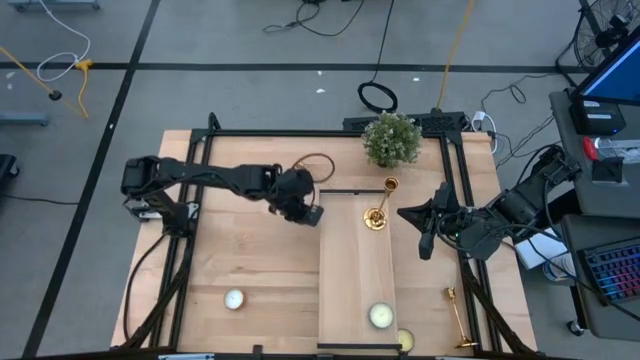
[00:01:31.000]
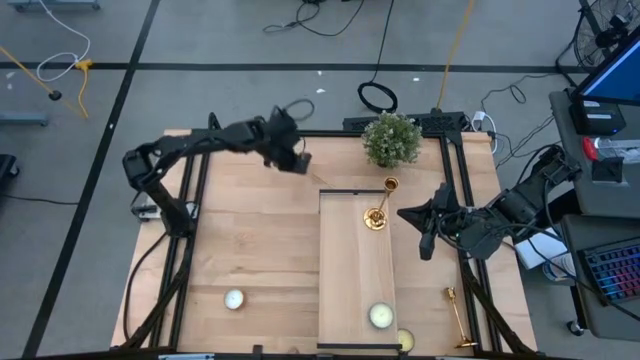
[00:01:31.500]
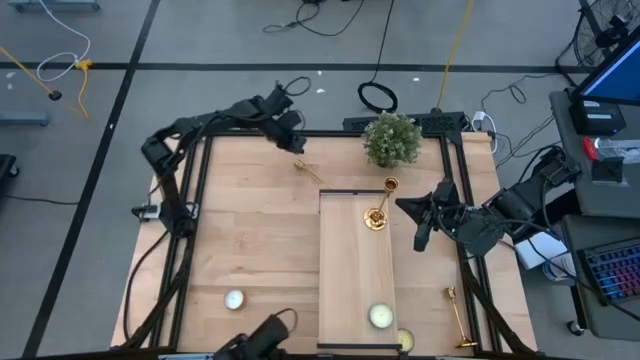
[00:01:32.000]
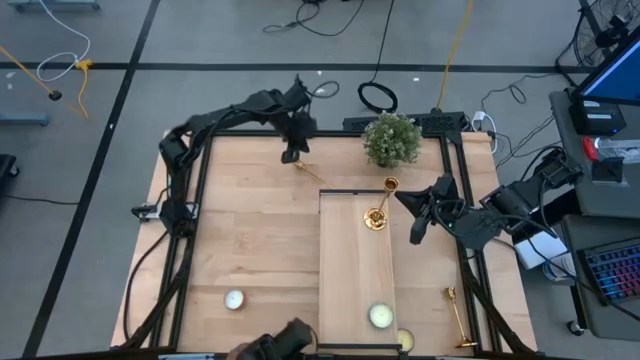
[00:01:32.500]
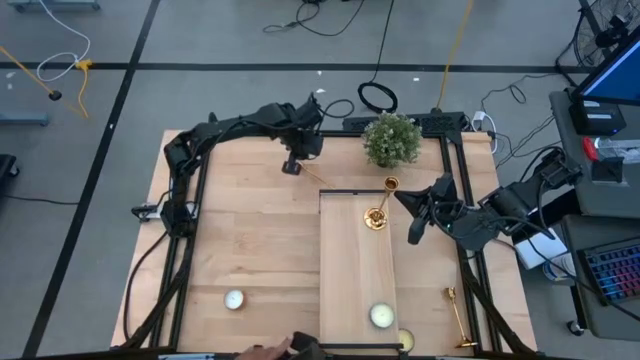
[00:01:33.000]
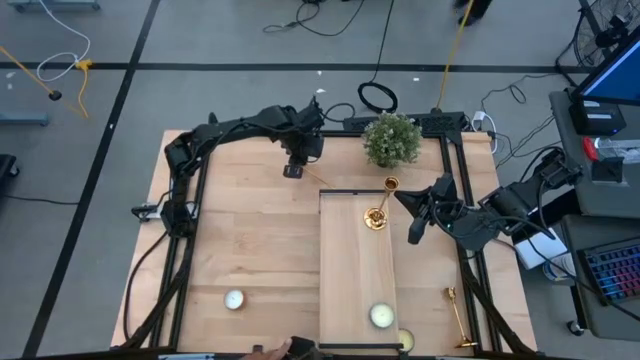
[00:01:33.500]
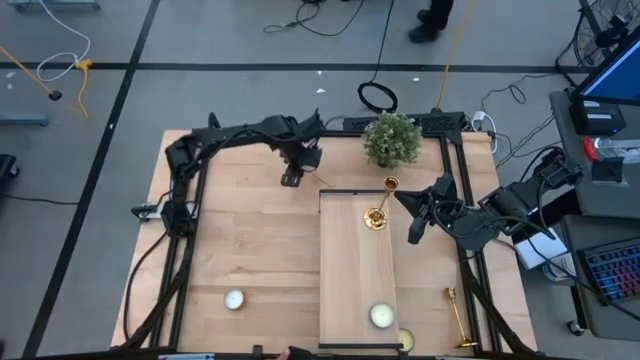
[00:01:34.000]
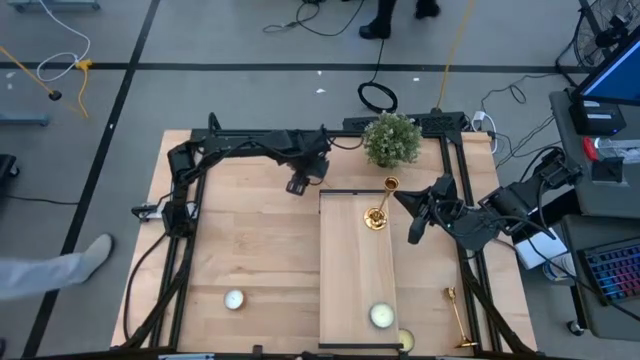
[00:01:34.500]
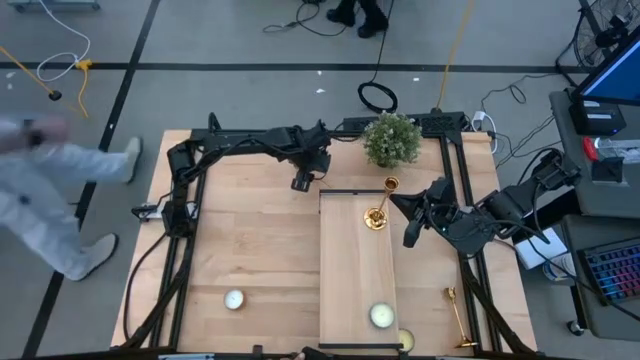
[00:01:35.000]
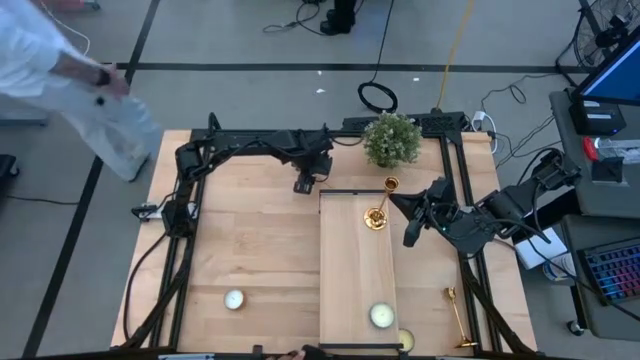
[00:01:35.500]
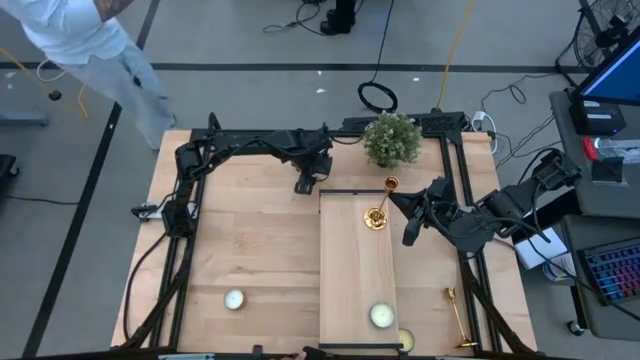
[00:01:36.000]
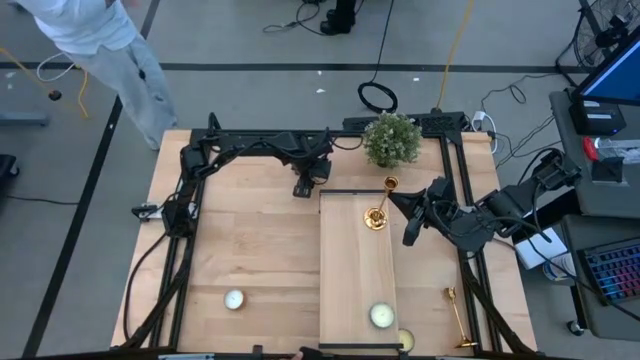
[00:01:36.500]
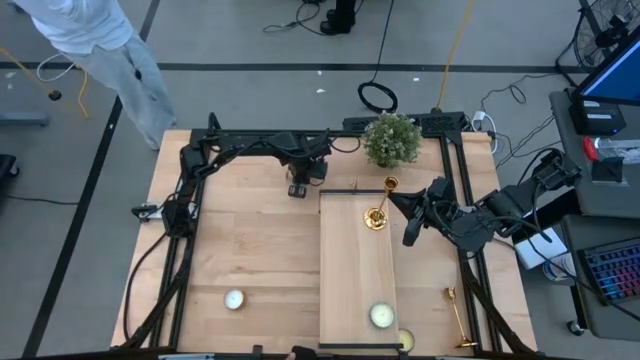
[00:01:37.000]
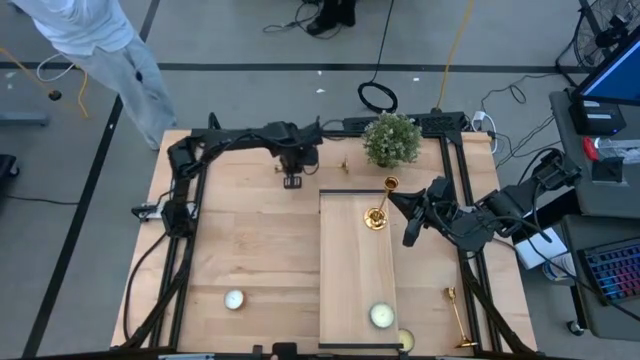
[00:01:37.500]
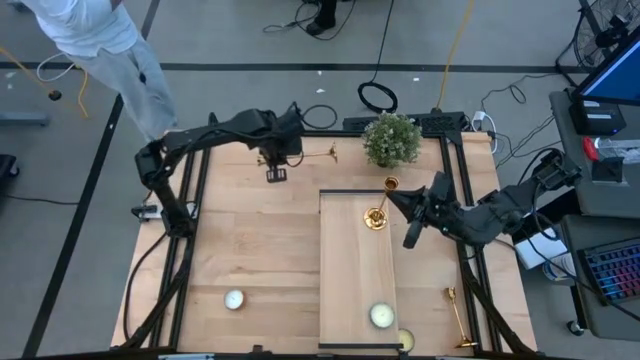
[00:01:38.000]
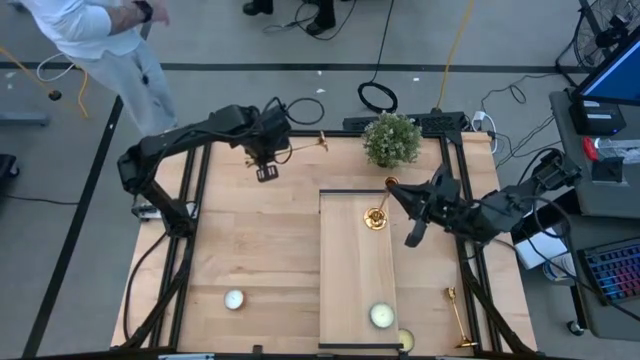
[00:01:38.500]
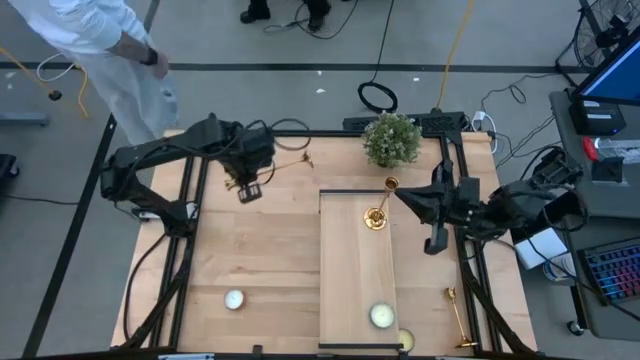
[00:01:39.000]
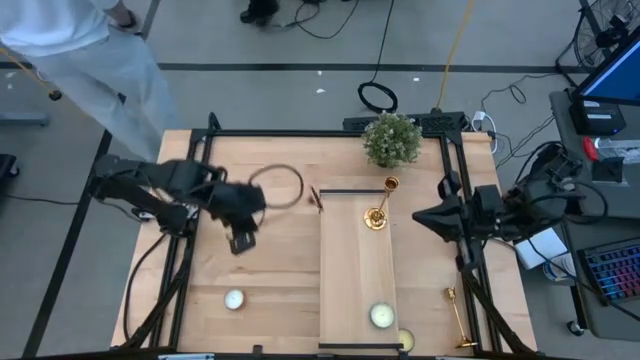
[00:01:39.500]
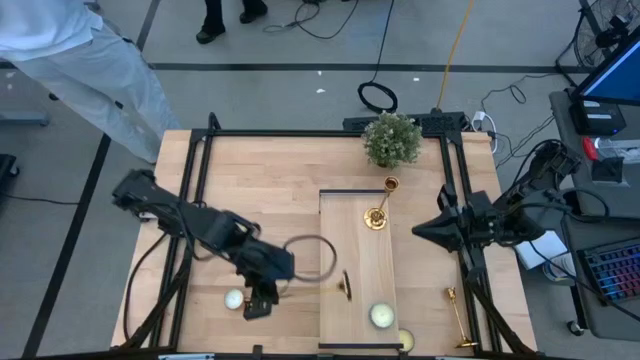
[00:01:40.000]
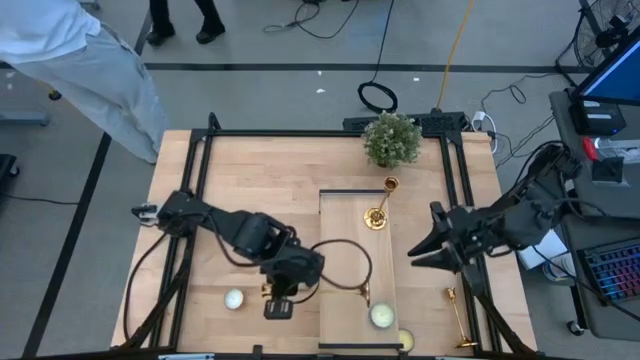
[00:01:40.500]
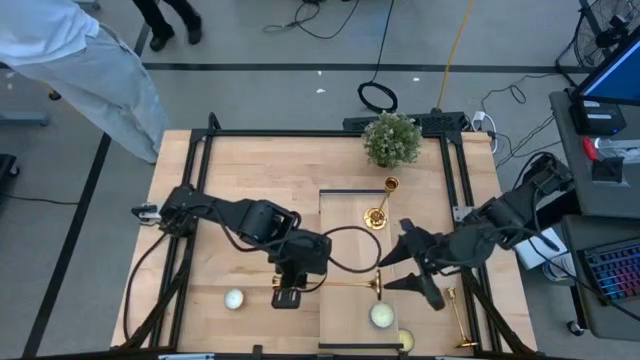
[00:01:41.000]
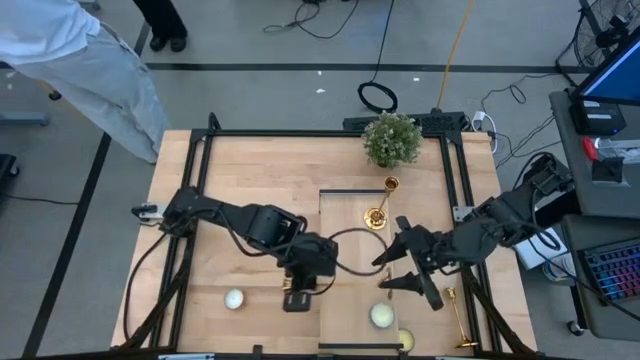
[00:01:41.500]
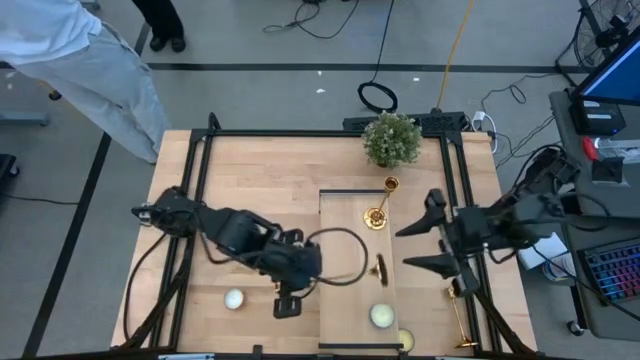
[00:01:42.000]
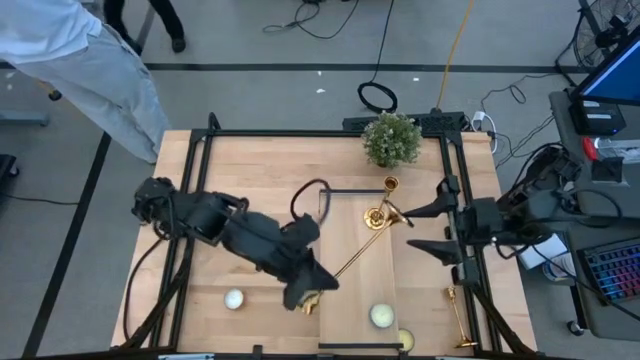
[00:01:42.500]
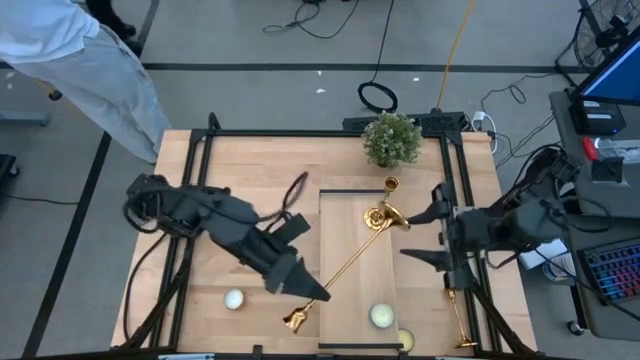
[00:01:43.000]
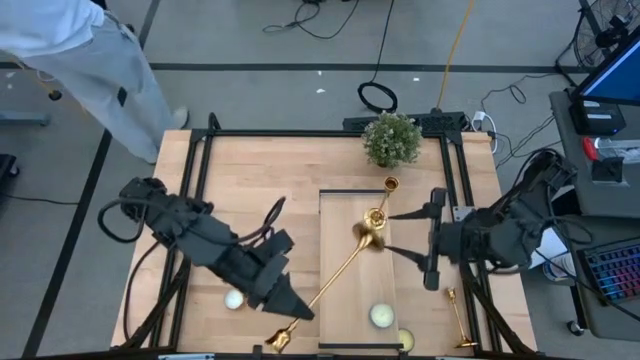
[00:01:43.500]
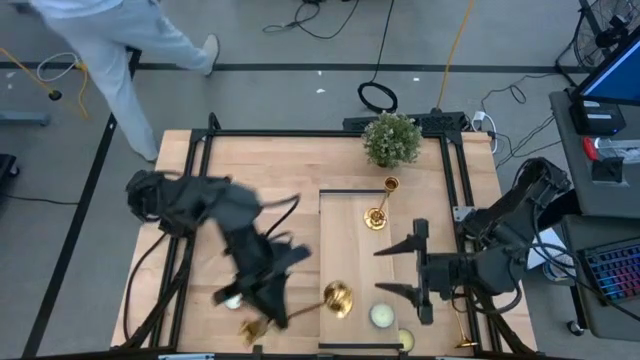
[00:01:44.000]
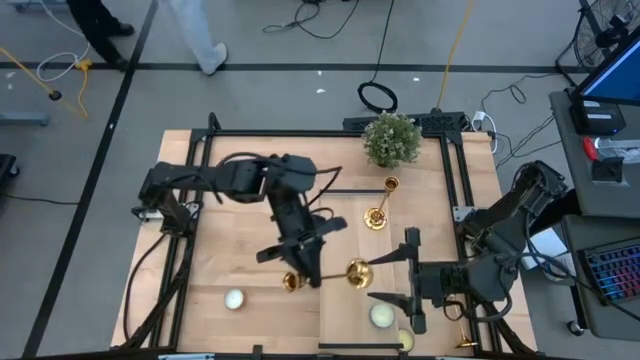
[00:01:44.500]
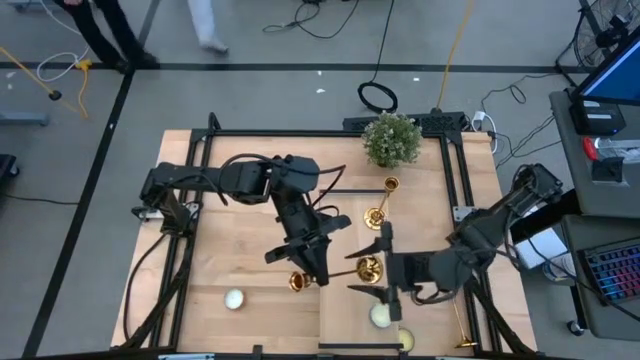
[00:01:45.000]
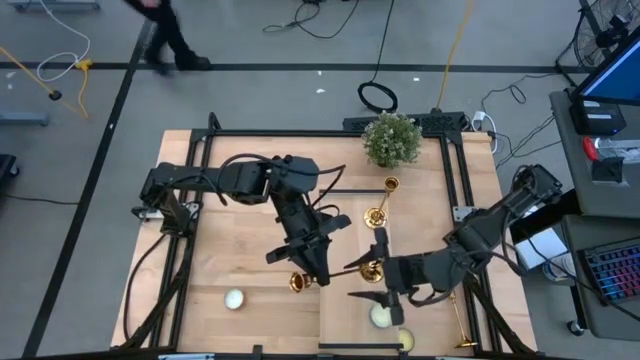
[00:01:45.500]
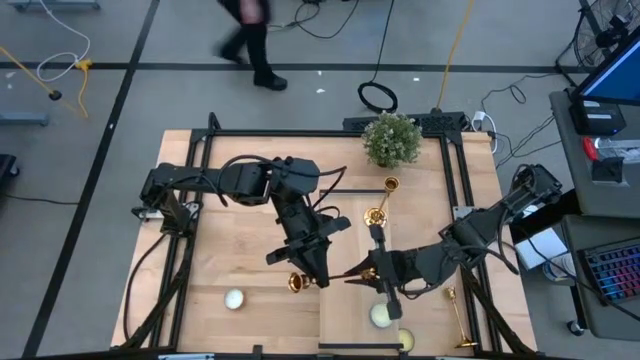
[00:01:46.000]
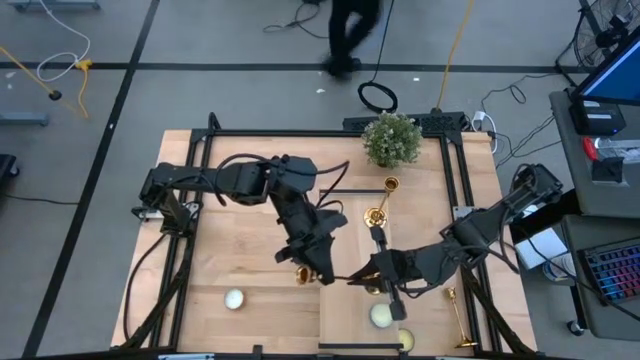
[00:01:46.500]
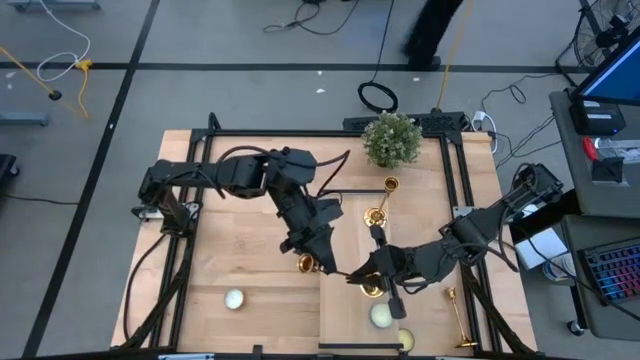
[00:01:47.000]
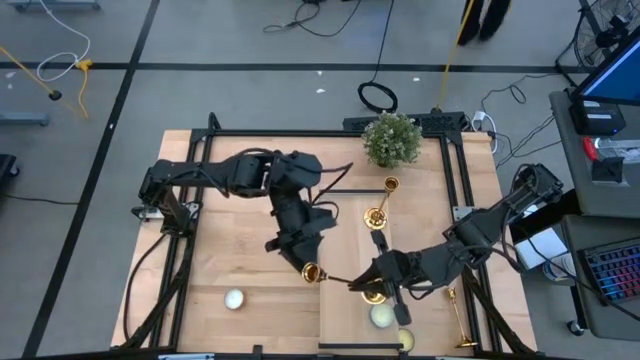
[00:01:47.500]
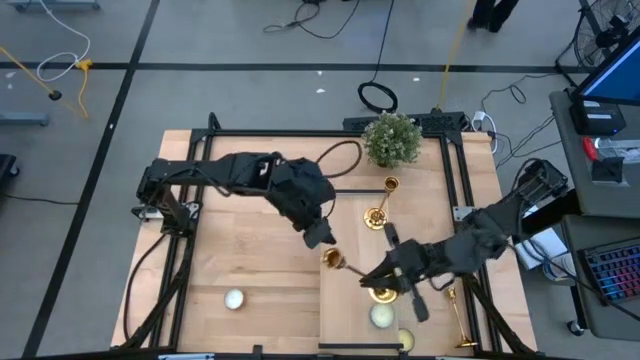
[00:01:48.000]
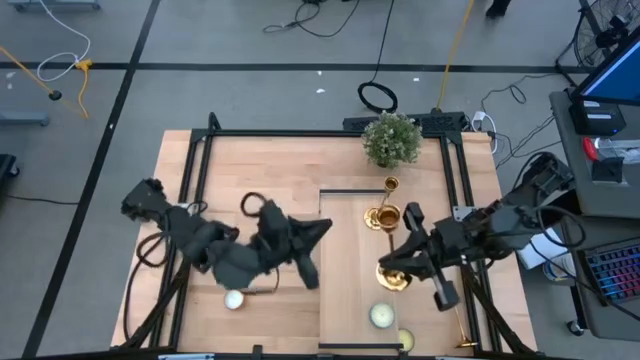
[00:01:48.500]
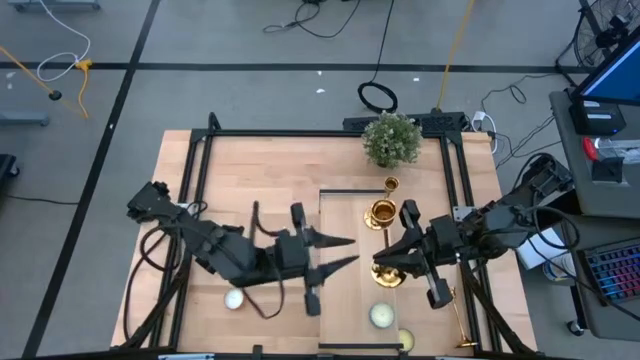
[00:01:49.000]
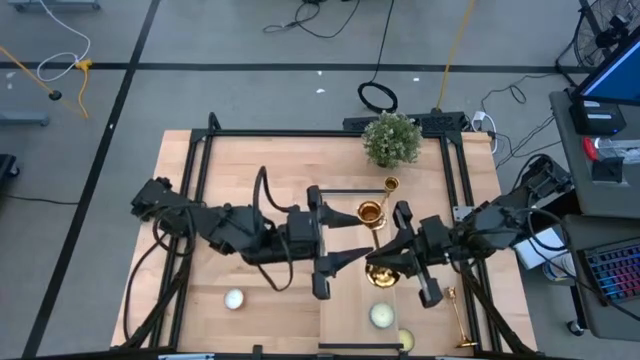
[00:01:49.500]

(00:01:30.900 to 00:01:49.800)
Task: Pick & Place candle stick holders
Put the top gold candle holder on the shelf

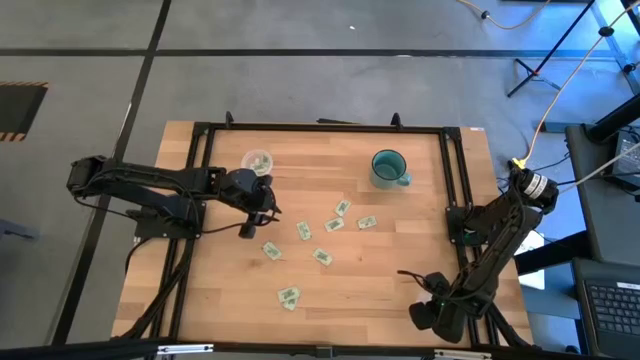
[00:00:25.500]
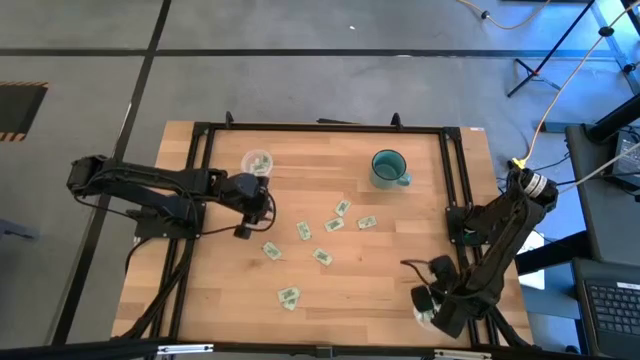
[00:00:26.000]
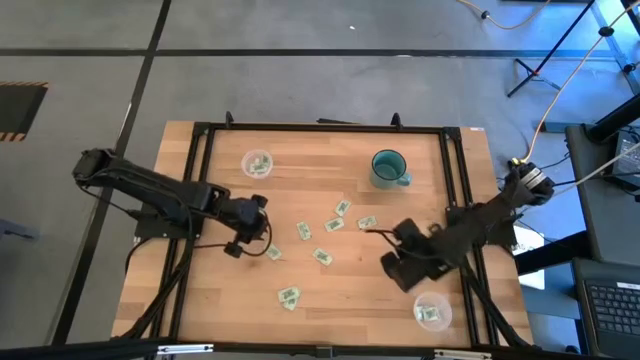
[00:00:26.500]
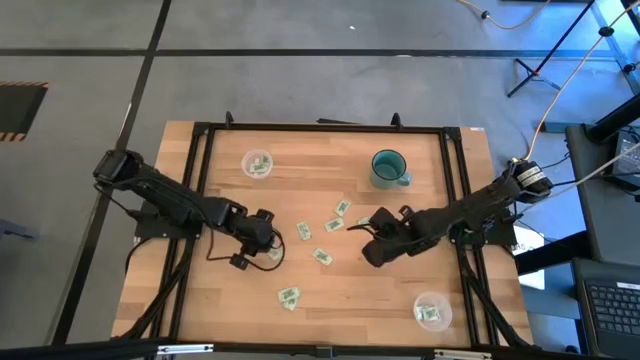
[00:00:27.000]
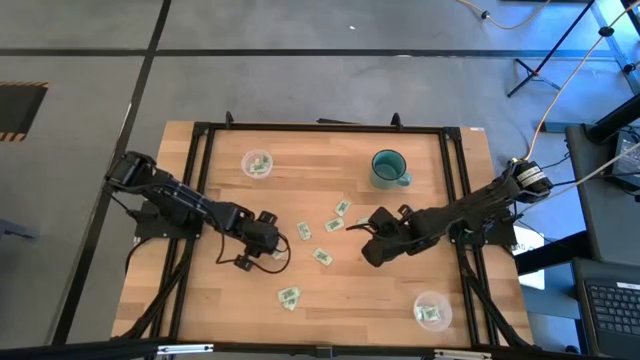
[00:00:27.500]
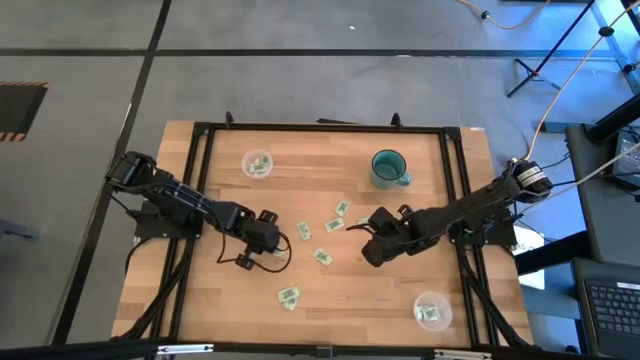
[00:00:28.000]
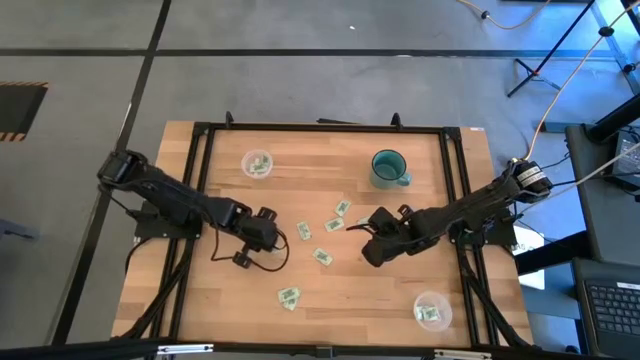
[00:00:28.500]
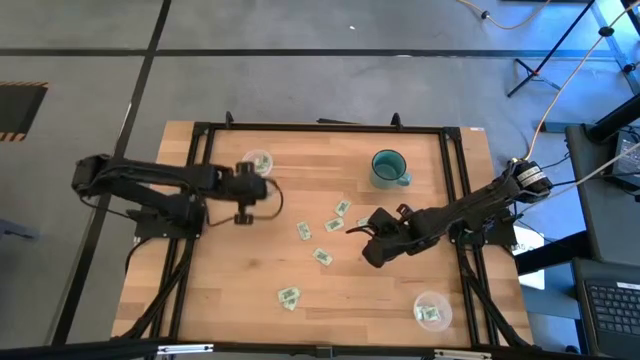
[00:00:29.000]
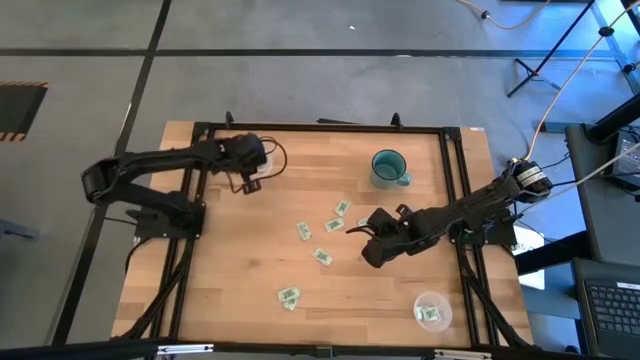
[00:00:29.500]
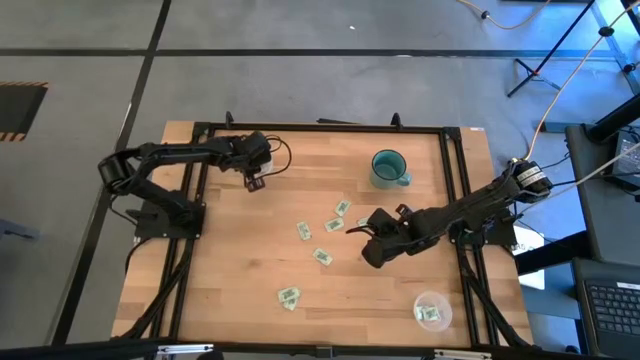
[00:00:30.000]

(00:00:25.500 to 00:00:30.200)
Task: Pick and place Stevia / Truvia into bins
Put the stevia packet into the top transparent container
